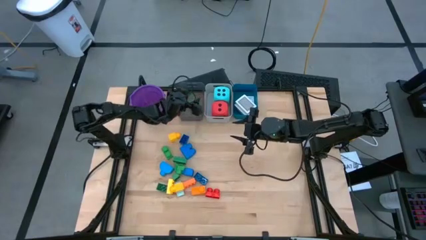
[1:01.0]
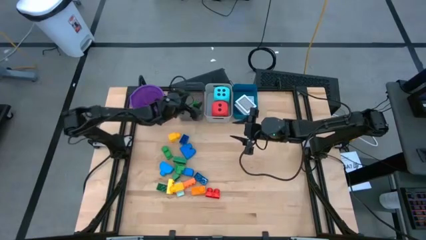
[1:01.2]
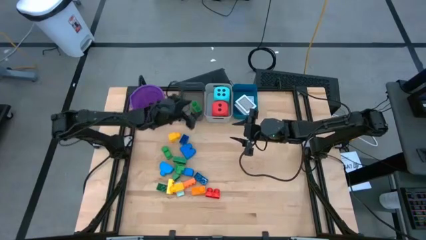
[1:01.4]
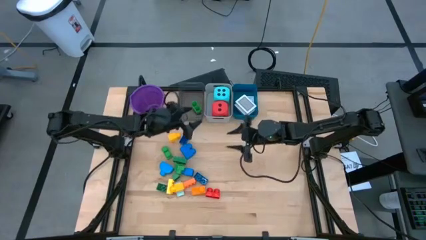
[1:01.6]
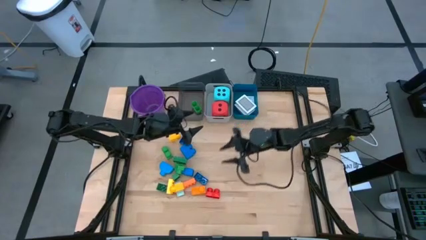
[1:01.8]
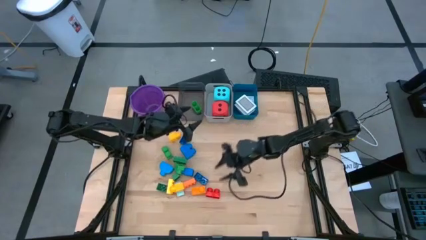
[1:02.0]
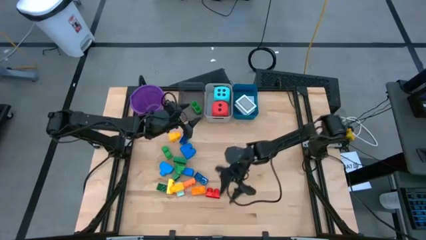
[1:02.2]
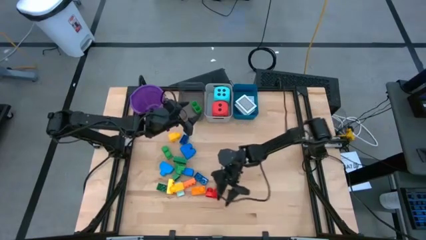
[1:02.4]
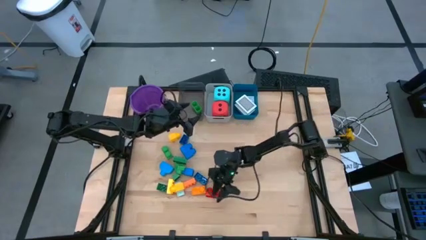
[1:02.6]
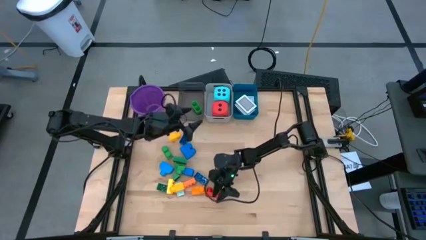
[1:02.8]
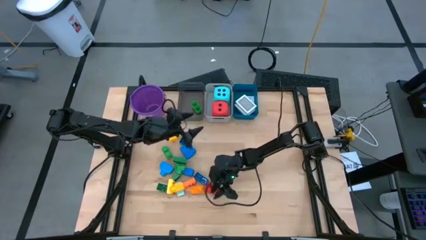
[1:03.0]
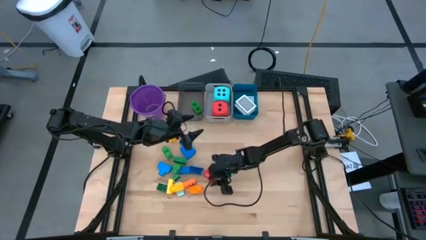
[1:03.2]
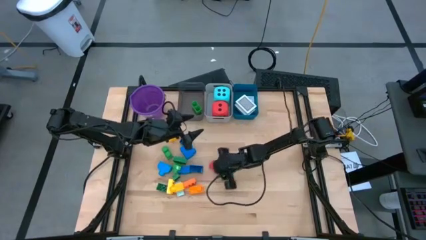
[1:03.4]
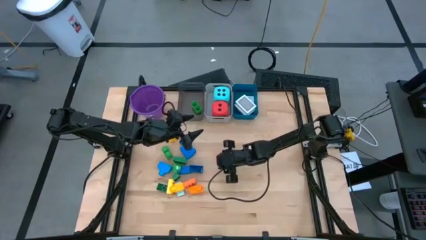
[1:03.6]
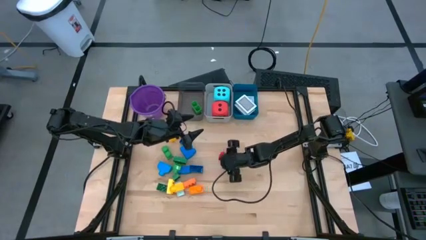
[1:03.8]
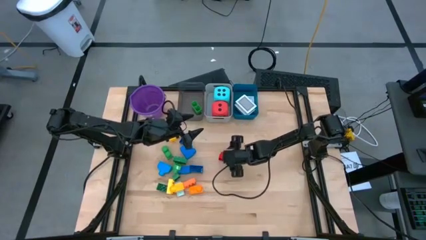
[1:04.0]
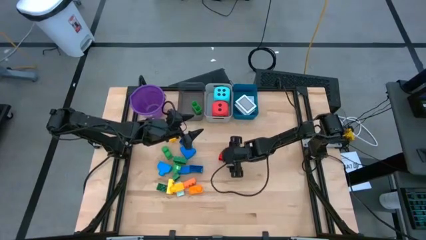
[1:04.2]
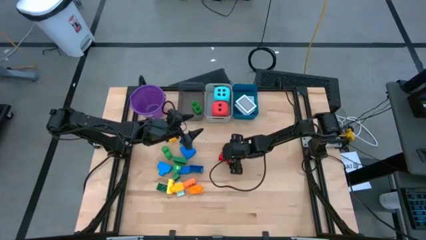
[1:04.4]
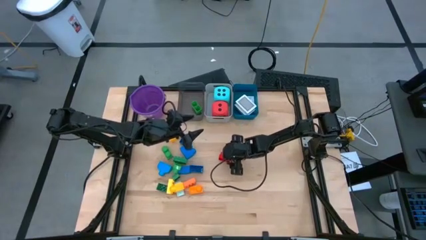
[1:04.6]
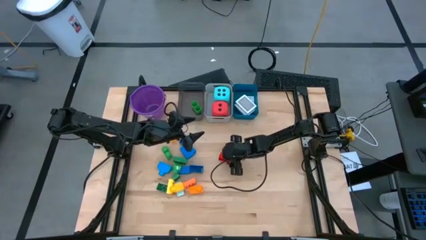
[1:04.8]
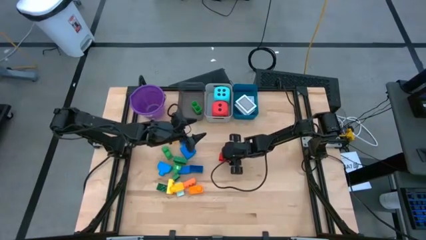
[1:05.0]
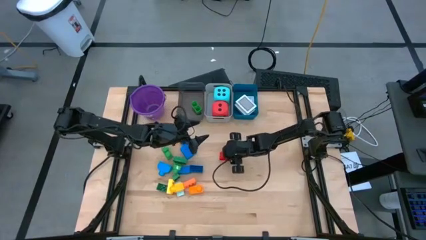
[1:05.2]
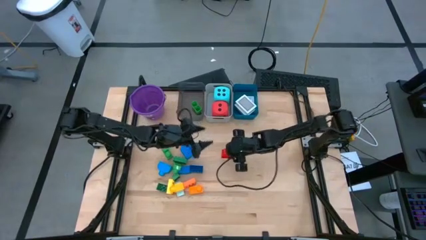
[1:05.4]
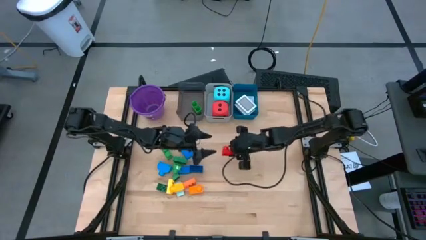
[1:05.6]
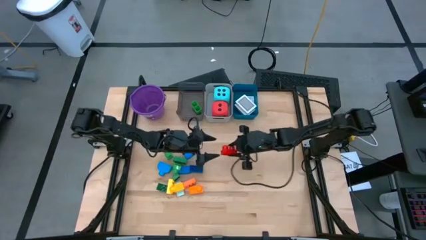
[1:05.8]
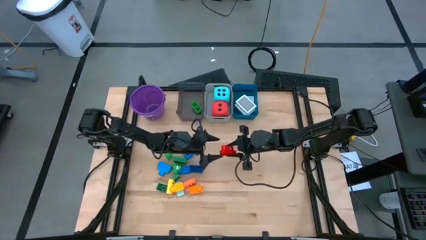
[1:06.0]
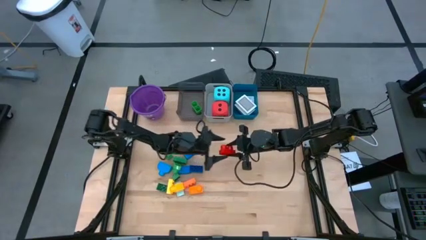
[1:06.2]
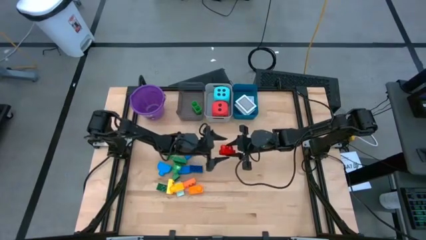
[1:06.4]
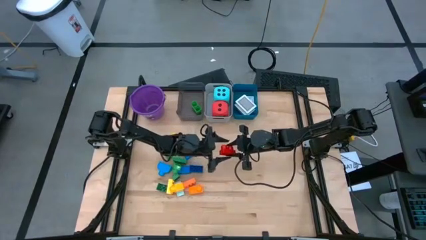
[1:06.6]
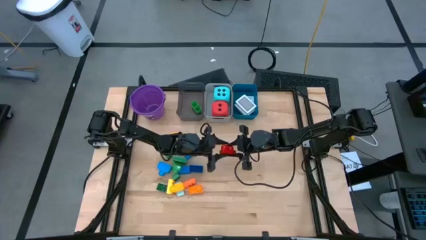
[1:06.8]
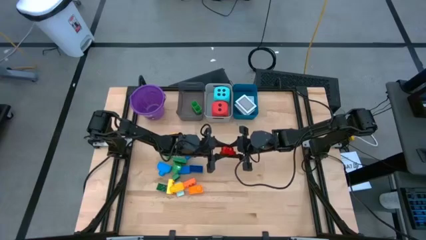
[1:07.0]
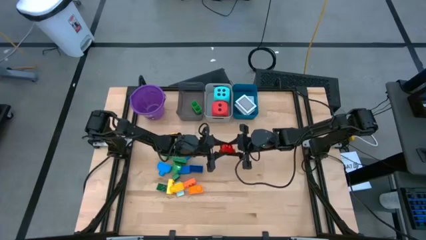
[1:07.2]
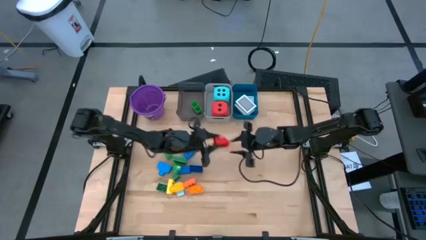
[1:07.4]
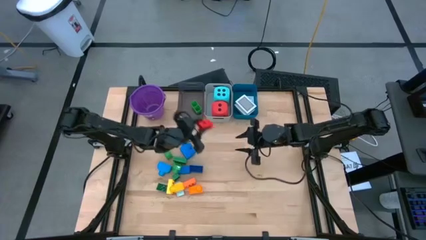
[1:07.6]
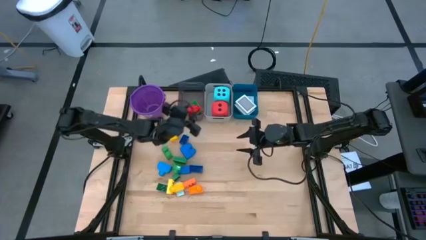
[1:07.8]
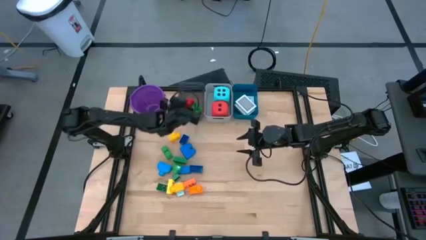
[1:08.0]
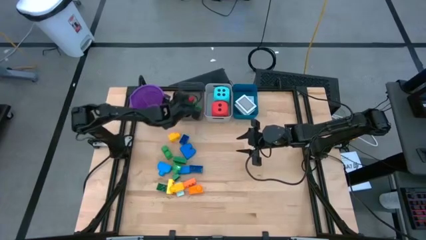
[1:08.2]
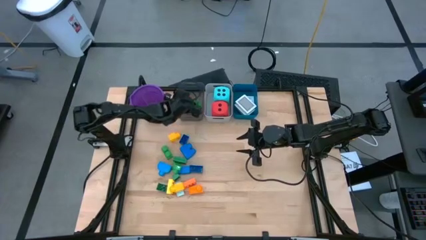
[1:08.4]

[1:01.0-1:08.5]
Task: Pick & Place Toys
Put the red game piece into the black bin

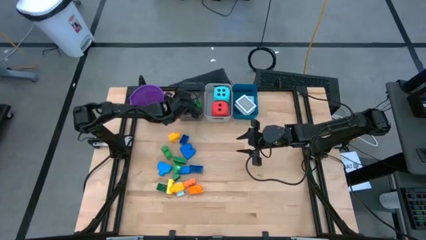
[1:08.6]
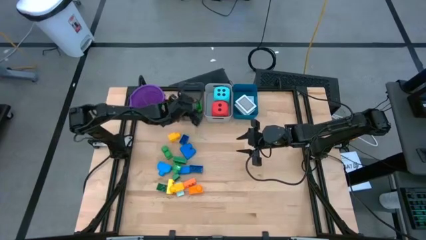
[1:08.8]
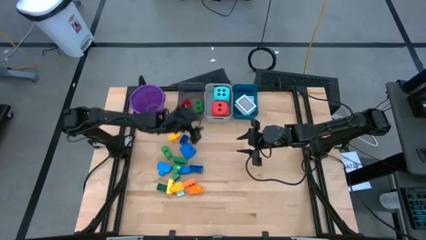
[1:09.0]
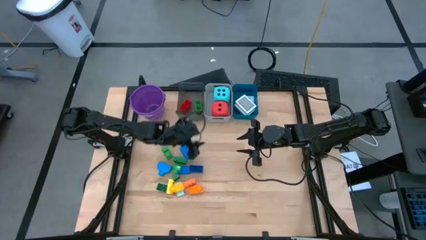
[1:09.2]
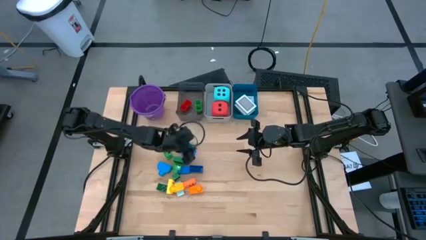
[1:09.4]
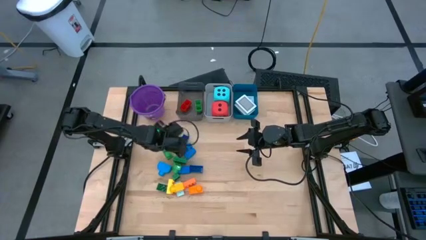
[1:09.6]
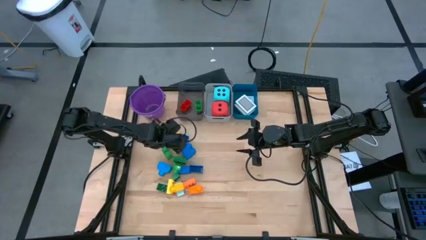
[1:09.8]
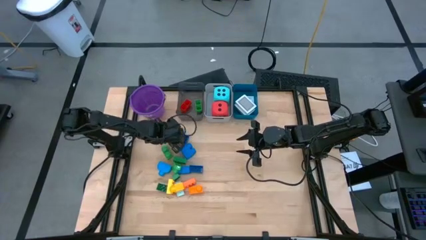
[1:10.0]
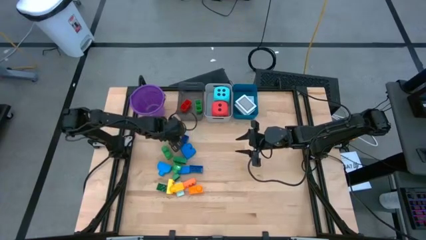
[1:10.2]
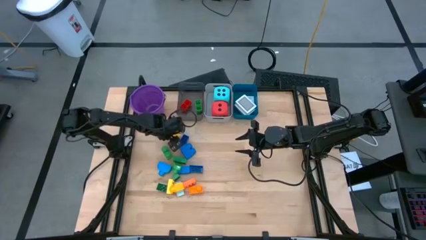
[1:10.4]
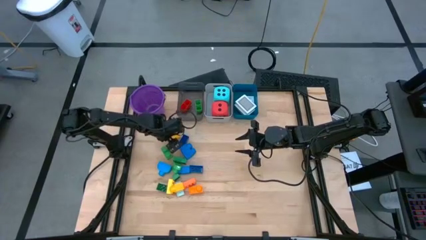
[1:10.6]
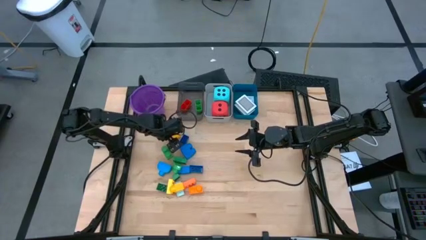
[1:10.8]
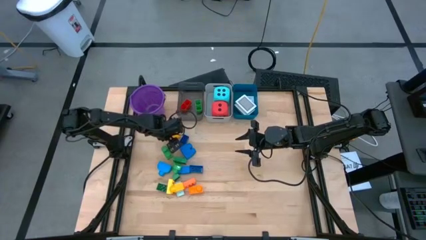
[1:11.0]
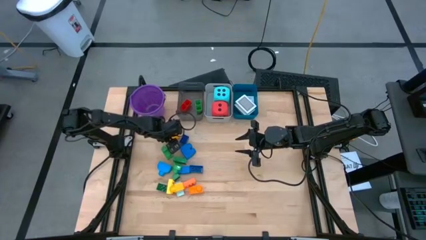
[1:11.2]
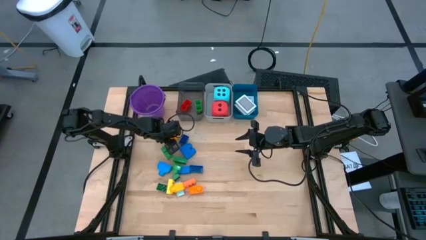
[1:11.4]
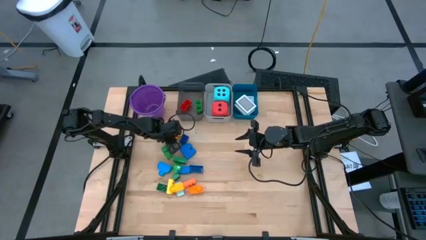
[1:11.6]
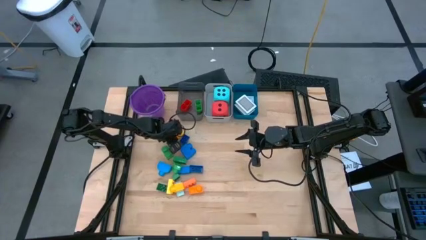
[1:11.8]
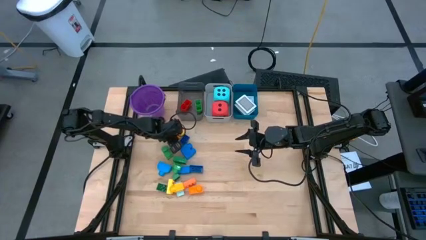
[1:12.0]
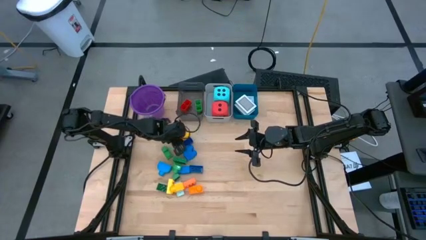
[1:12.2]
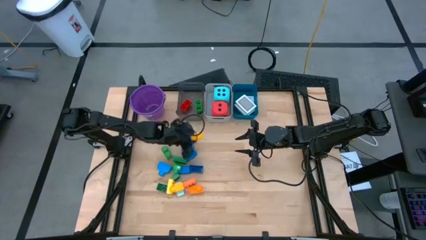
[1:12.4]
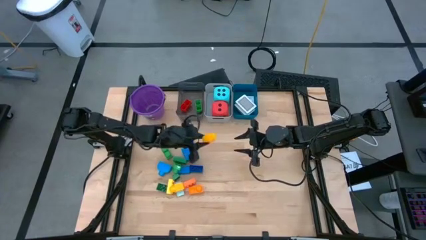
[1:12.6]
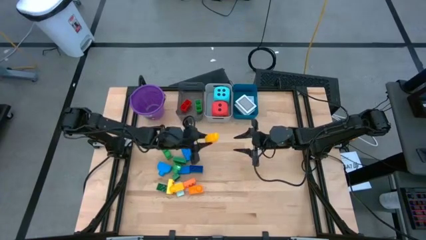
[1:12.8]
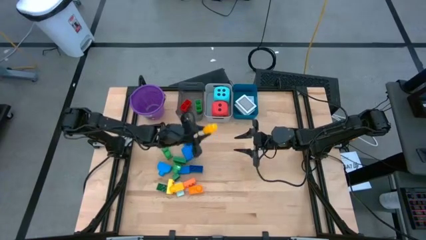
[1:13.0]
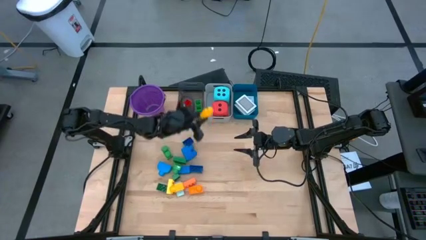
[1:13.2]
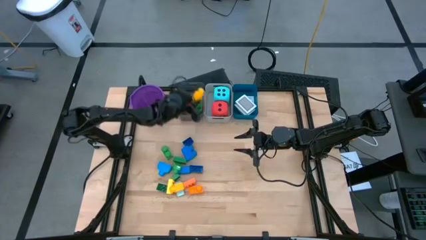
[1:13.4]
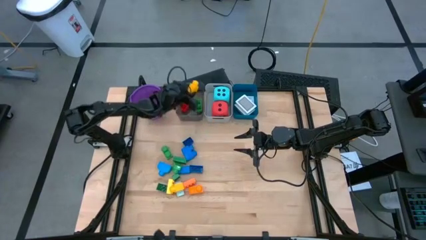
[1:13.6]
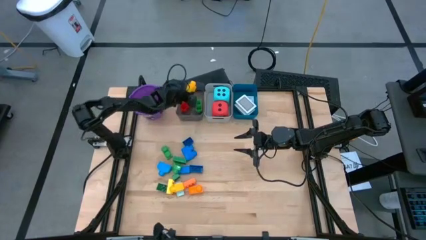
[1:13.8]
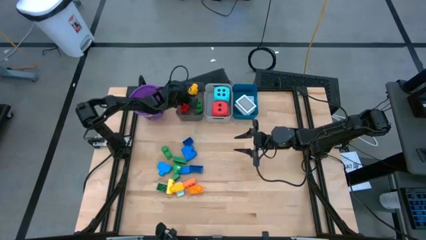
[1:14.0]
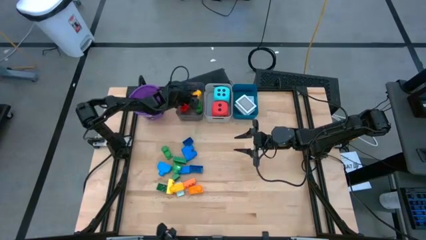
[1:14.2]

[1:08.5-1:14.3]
Put the yellow game piece into the black bin

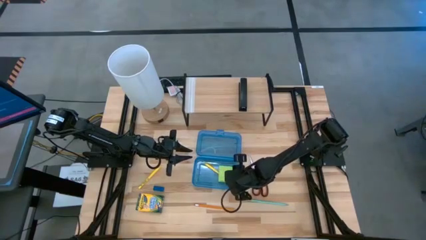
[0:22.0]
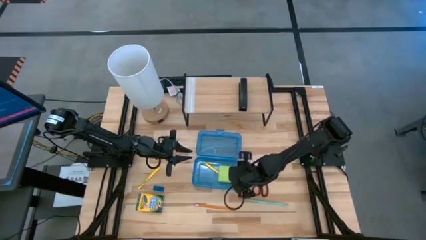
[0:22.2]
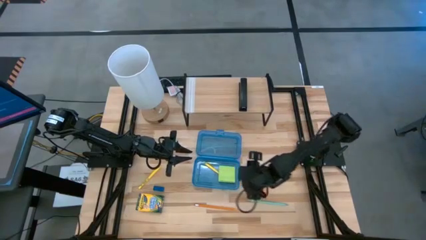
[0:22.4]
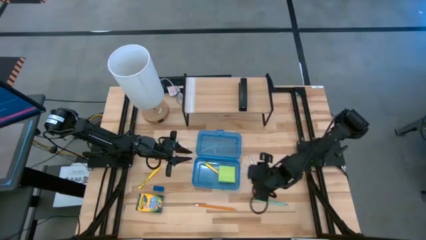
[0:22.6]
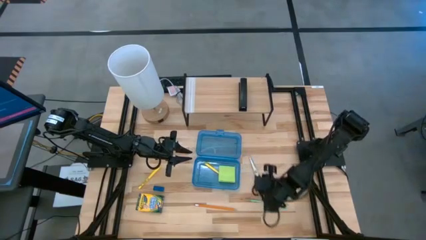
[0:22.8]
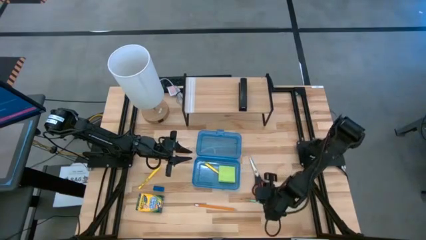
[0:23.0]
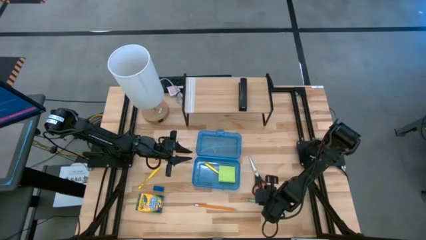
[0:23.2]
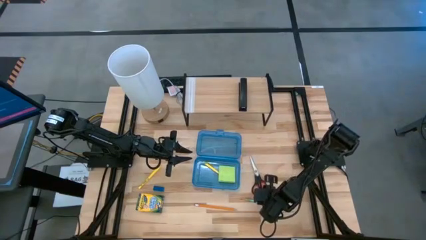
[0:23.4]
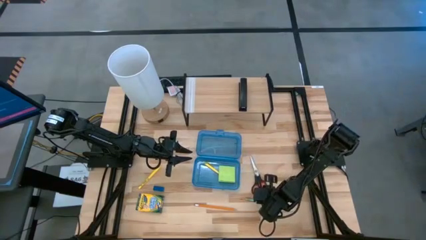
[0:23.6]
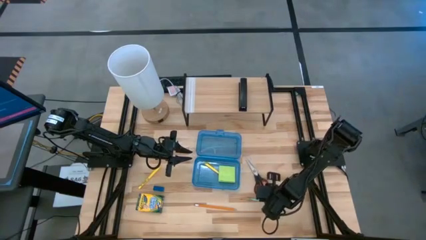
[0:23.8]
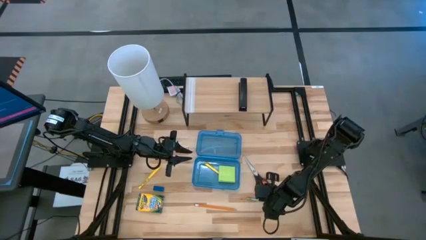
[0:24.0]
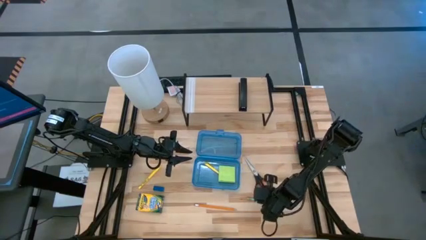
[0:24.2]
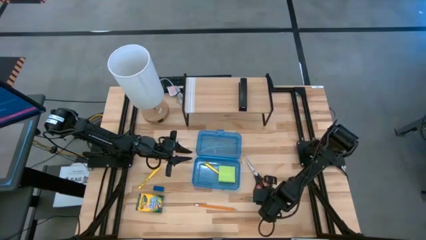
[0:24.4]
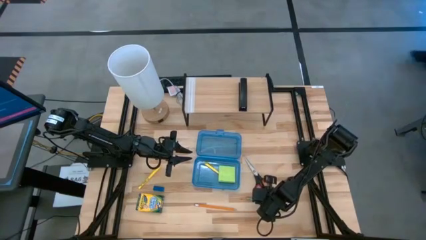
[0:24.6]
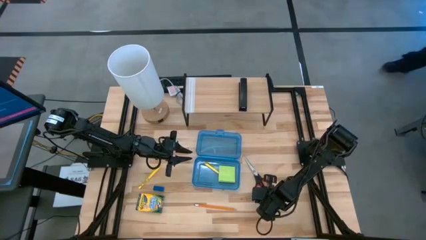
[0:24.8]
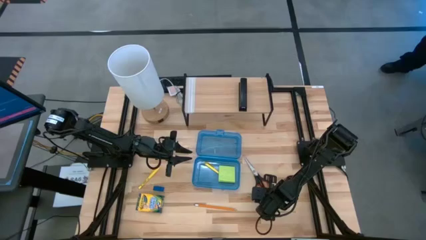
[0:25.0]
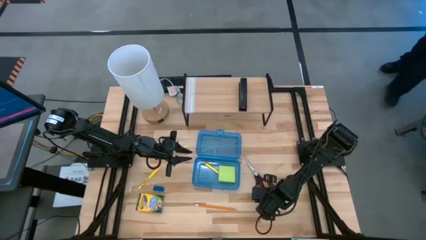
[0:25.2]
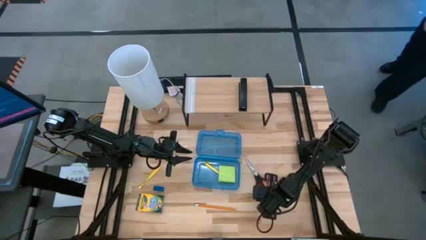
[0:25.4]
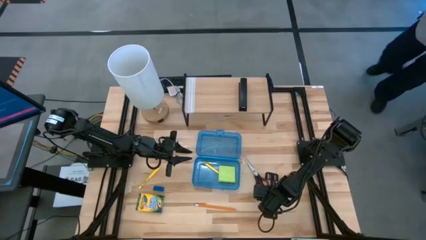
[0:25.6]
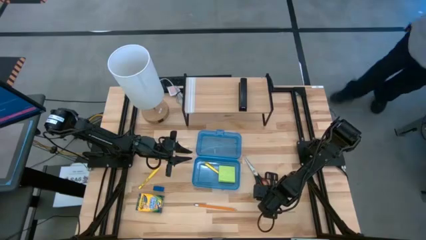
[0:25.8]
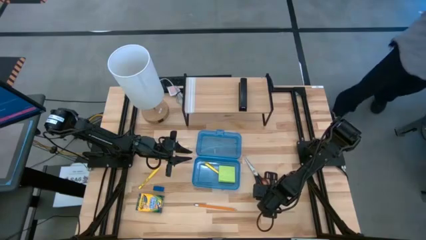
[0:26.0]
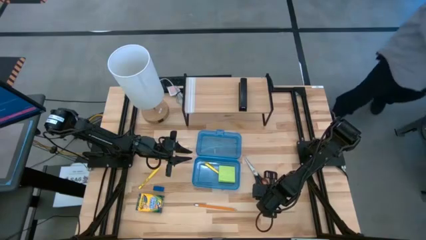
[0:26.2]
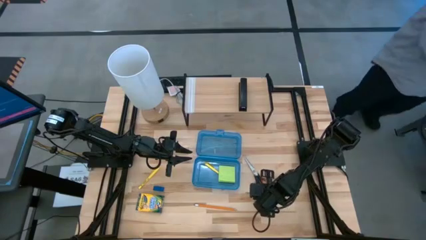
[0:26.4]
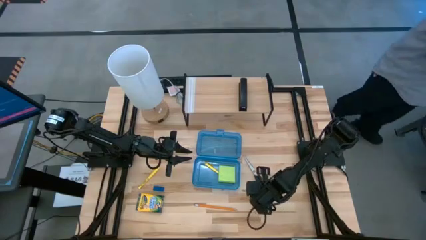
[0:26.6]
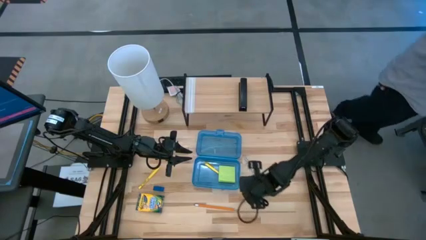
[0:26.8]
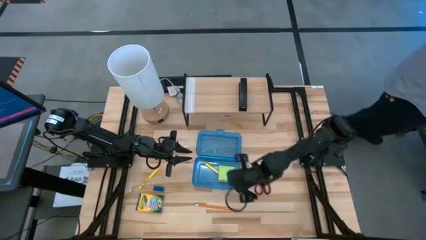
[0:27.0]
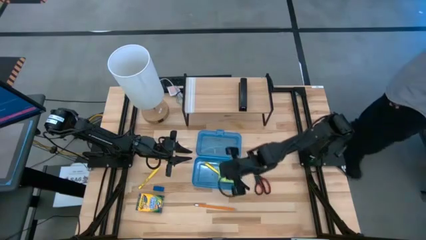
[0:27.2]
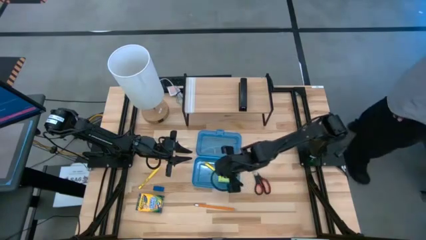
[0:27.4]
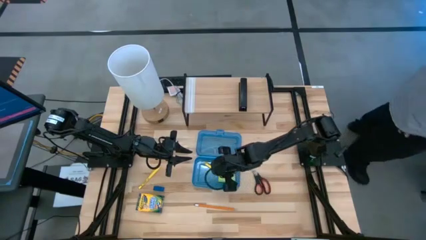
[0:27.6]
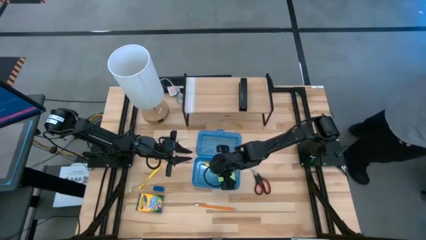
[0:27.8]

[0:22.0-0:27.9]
Task: Pack school essentials
Put the light blue pencil into the blue supply box
